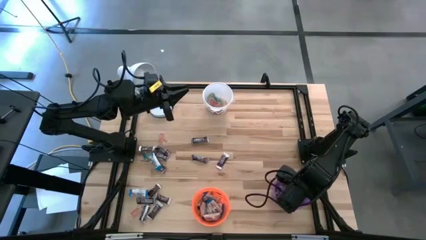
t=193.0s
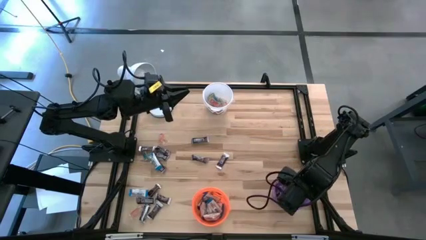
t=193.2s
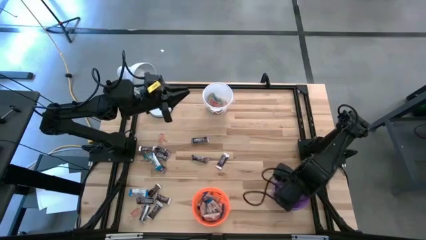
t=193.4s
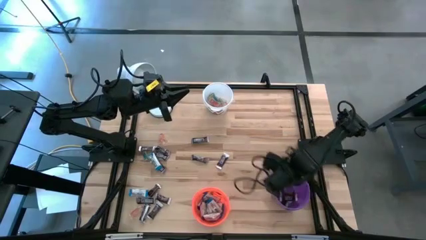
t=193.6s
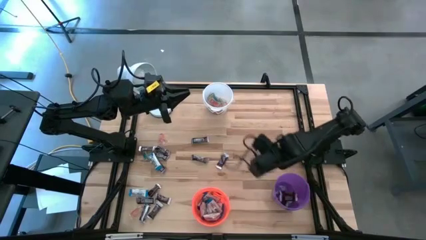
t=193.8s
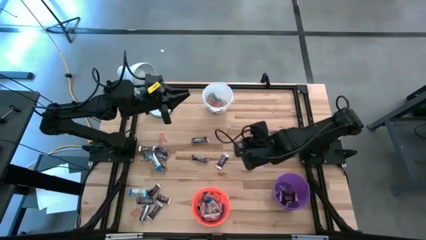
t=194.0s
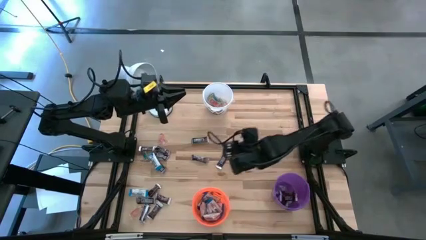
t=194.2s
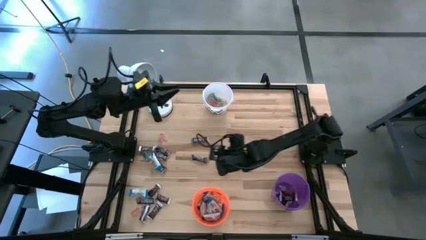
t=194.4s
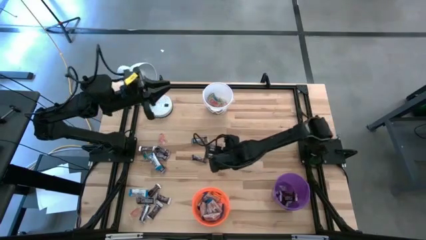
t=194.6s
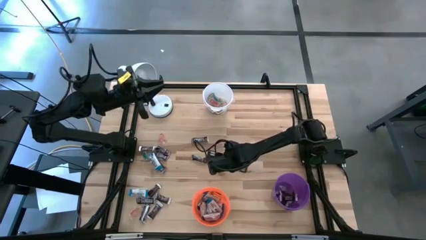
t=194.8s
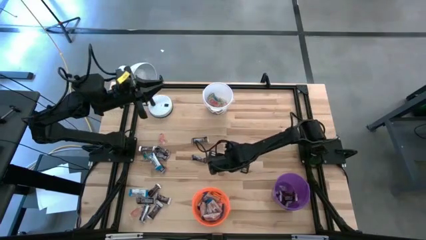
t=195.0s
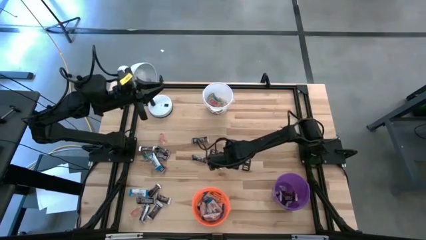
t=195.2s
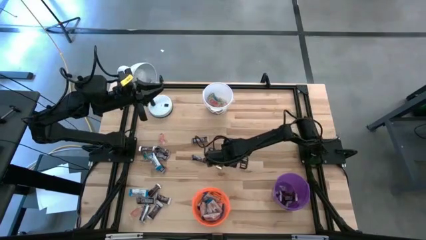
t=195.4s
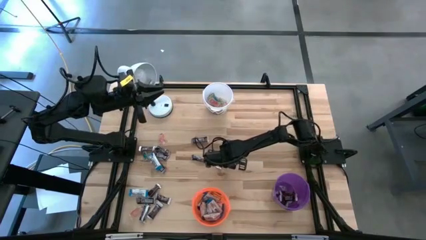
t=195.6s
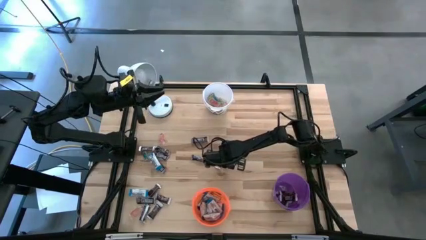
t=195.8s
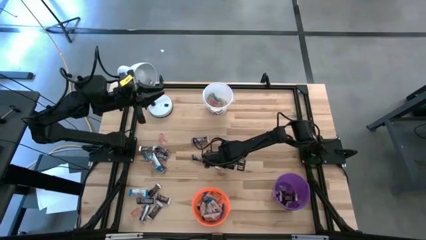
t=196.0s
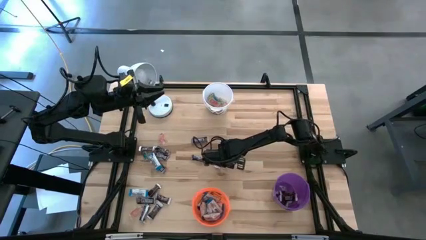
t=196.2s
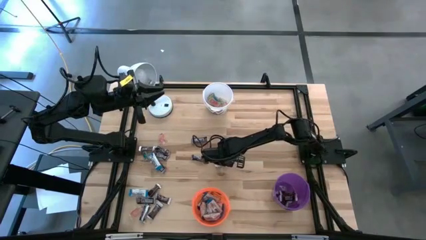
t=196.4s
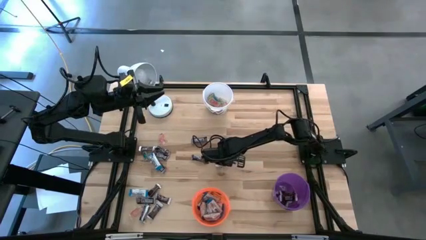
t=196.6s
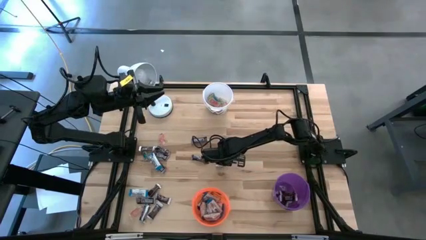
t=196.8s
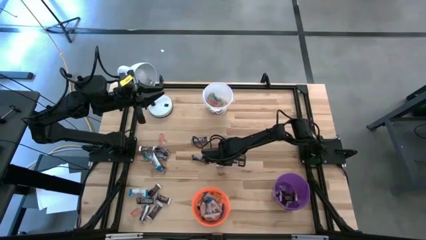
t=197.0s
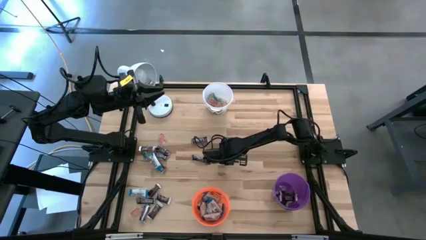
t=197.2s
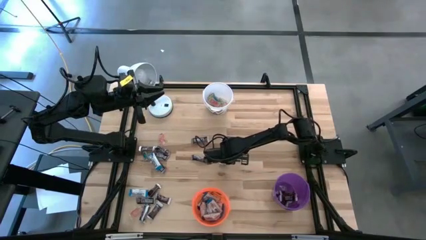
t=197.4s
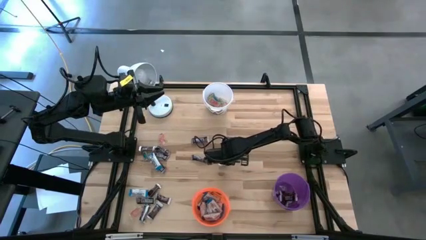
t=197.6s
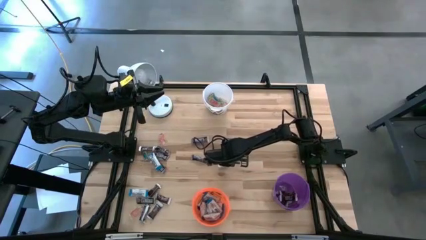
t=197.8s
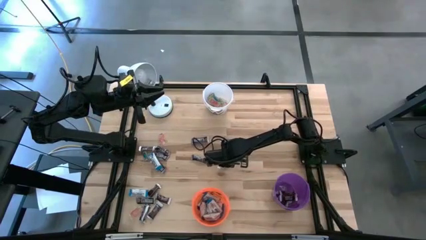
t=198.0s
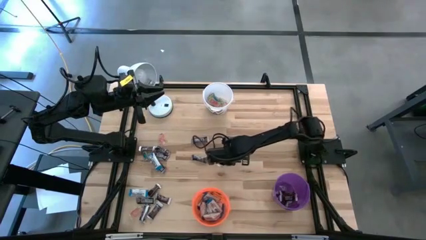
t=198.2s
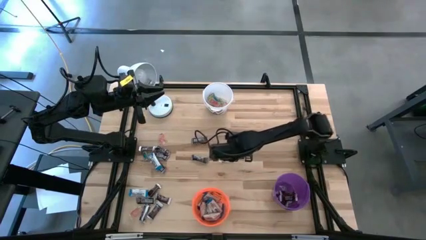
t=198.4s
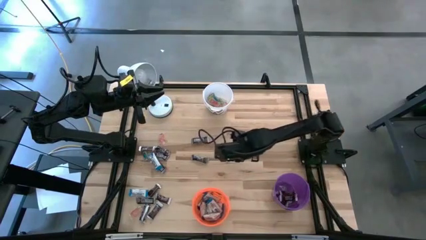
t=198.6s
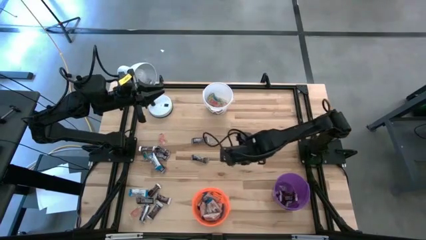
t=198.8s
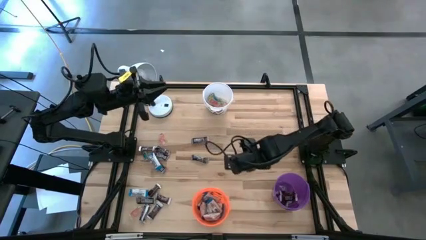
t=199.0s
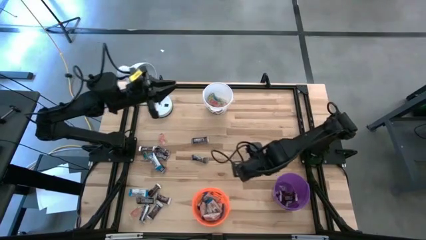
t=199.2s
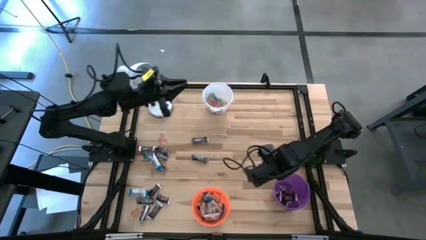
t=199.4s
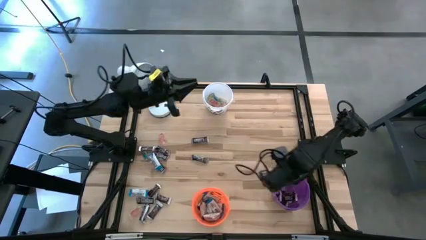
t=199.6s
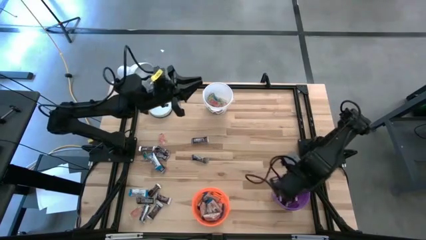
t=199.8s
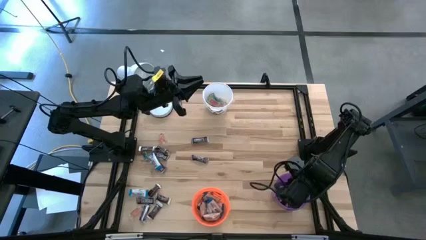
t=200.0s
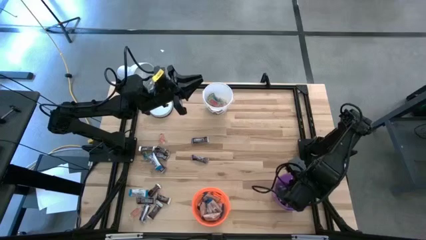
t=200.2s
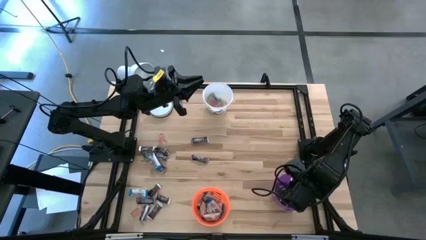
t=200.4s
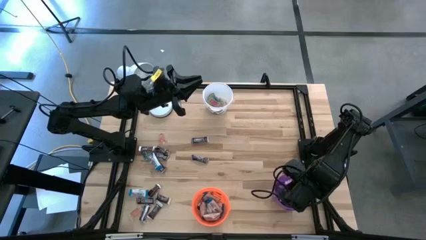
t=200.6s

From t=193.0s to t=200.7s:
Task: Organize candy in baskets
Put the dark brown chocolate bar into the dark purple bucket

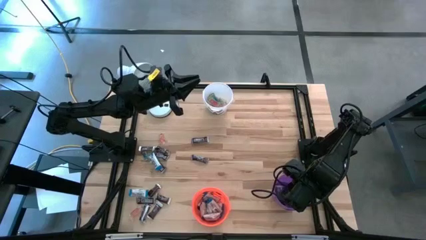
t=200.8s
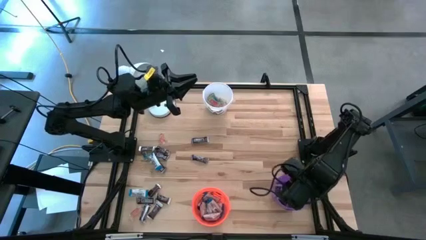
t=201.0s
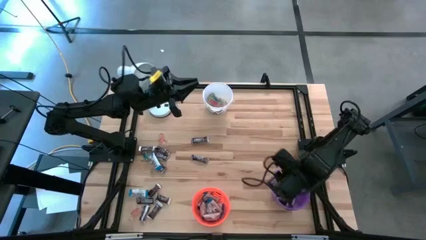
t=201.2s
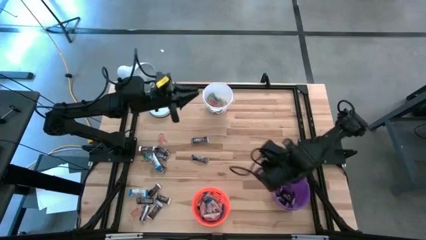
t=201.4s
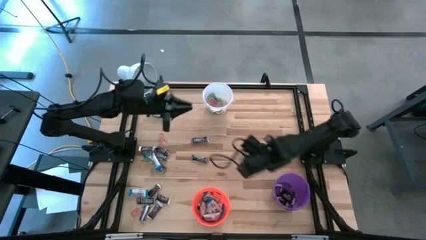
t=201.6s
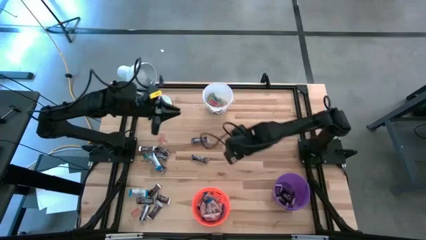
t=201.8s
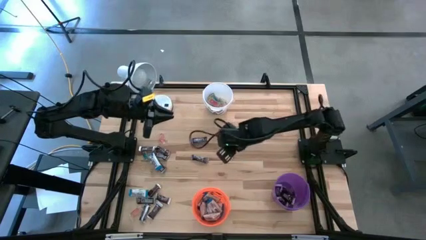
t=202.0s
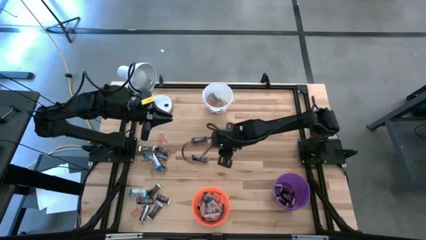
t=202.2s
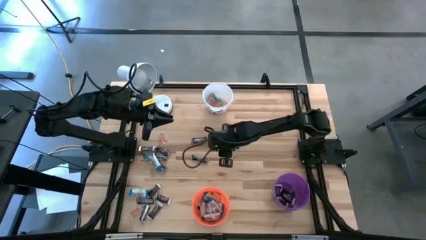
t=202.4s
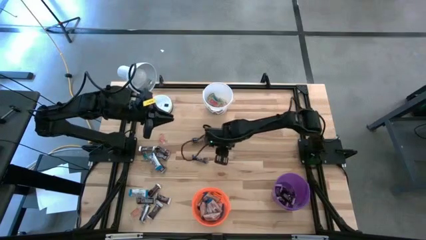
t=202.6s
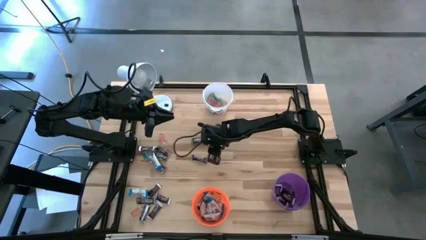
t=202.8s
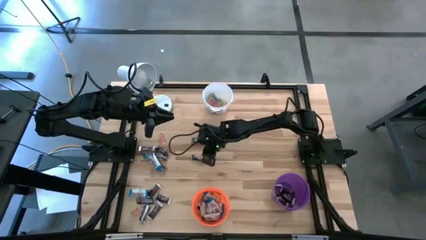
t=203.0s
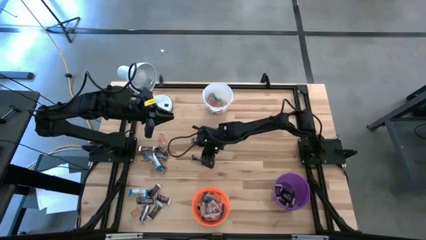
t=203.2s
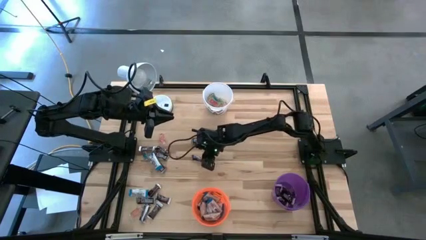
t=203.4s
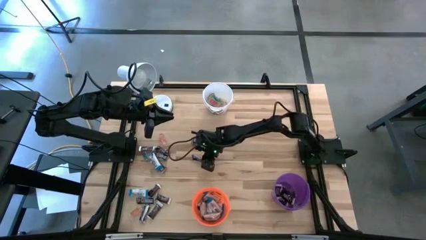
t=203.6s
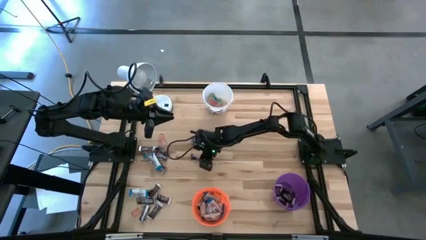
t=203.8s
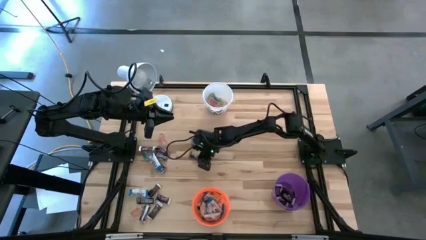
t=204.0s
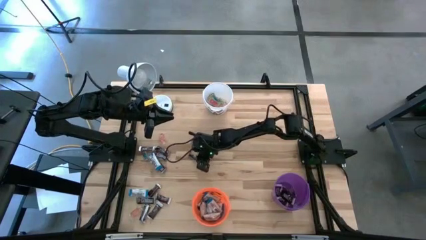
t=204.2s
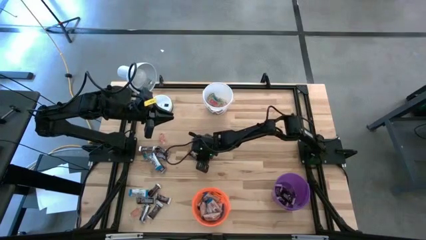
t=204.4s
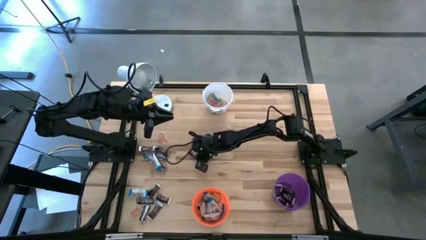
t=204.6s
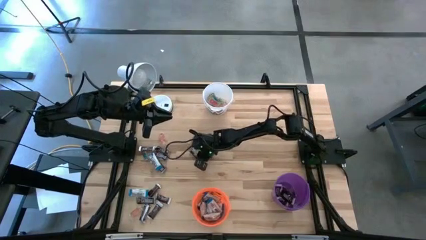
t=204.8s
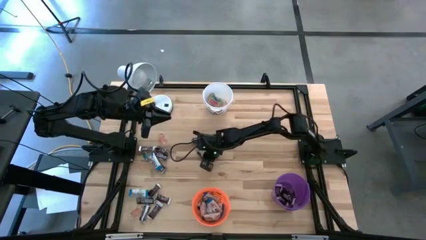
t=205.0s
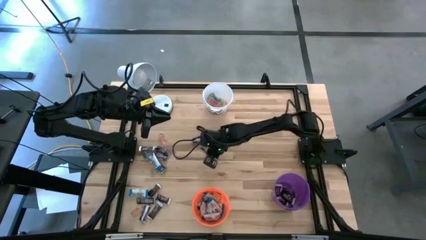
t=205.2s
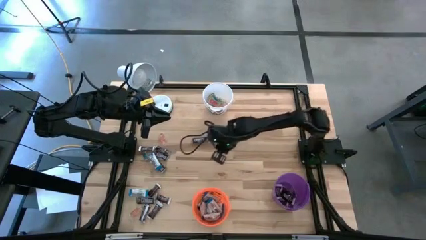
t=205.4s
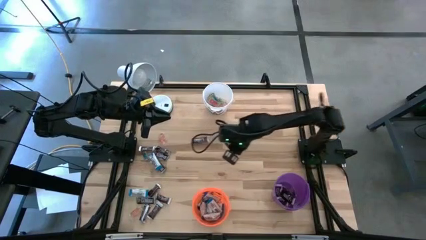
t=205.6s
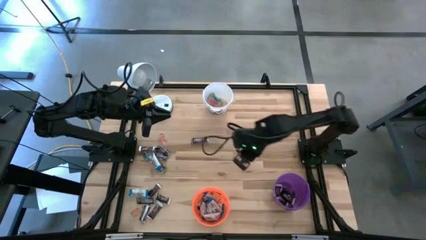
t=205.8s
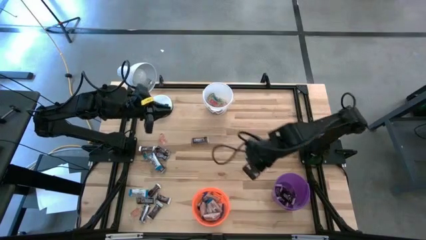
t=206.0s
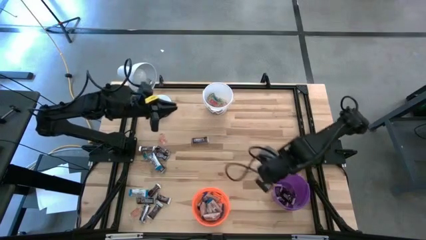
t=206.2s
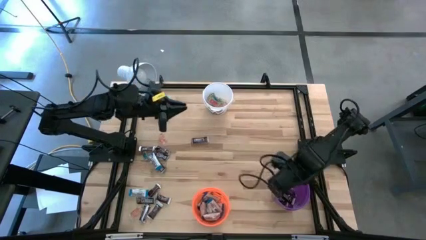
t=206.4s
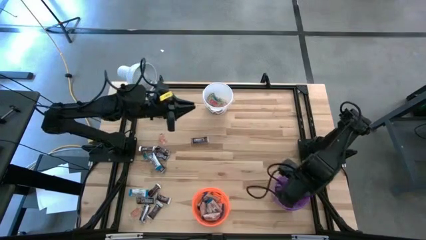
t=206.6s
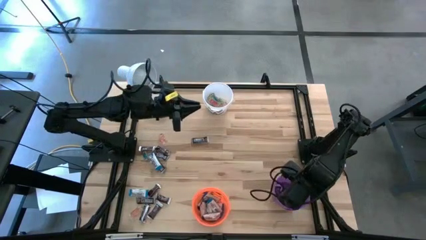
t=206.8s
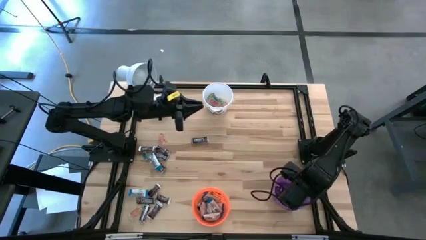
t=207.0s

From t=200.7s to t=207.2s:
Put the dark brown chocolate bar into the dark purple bucket

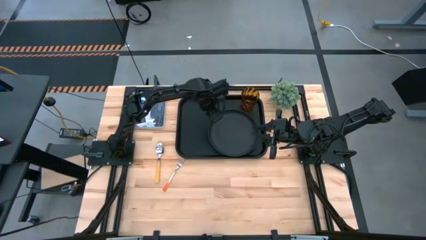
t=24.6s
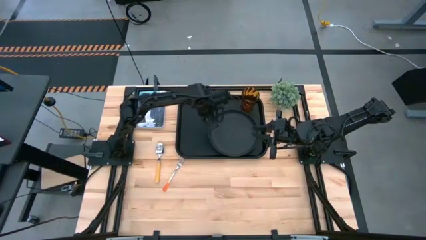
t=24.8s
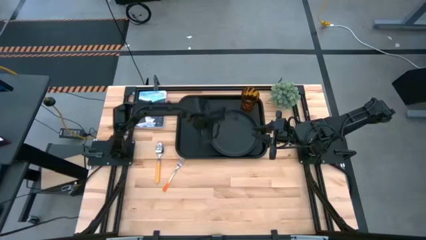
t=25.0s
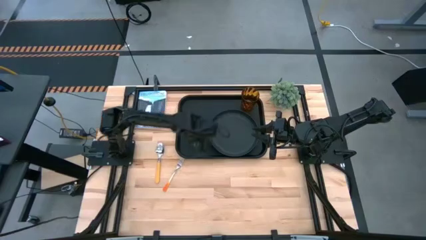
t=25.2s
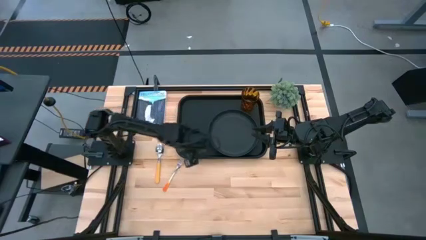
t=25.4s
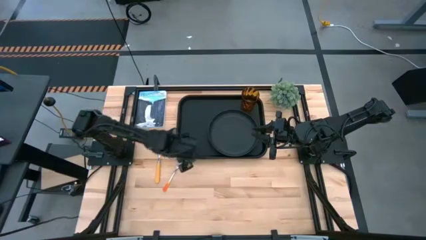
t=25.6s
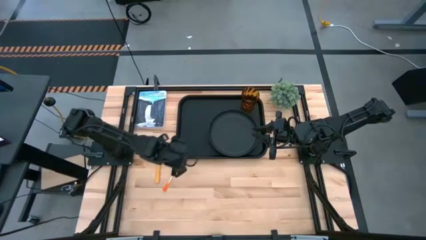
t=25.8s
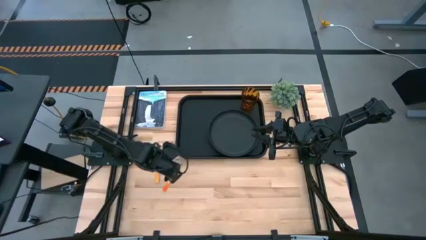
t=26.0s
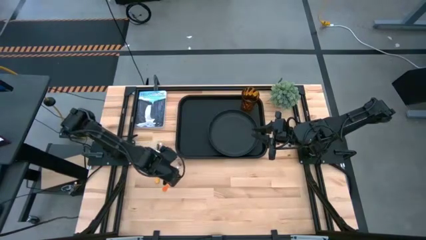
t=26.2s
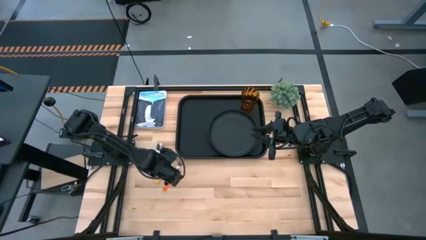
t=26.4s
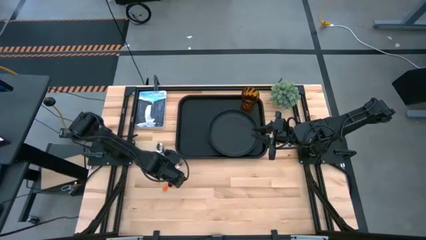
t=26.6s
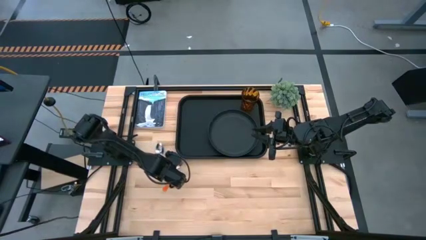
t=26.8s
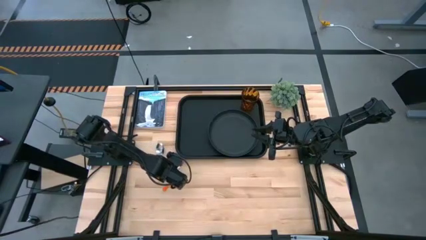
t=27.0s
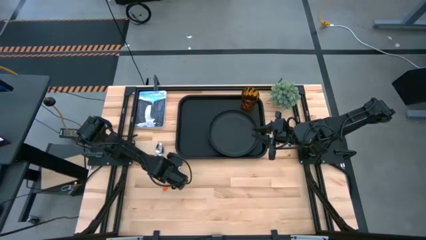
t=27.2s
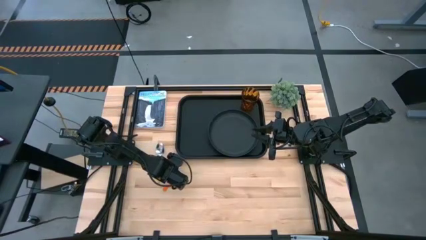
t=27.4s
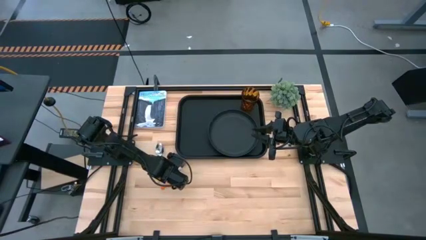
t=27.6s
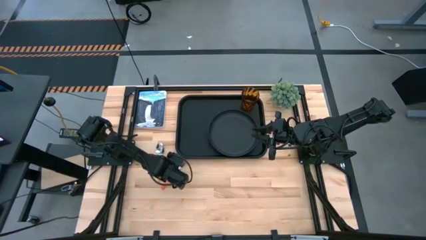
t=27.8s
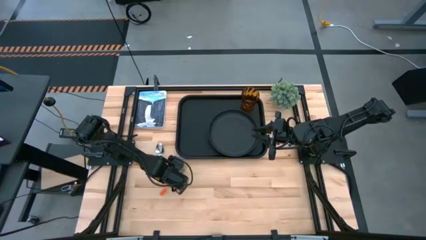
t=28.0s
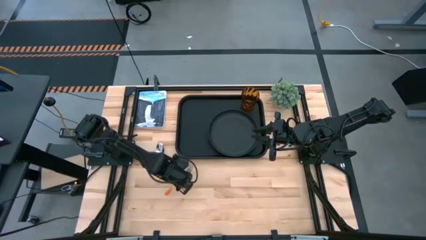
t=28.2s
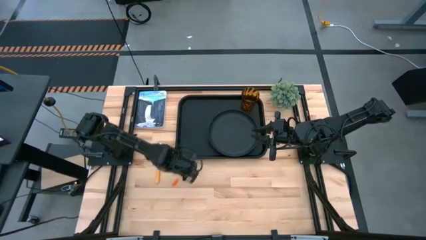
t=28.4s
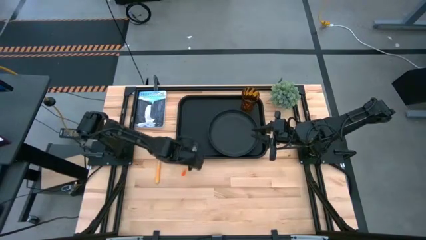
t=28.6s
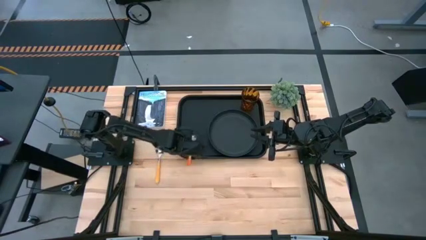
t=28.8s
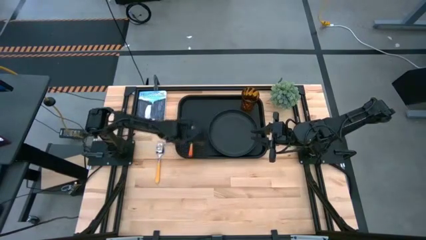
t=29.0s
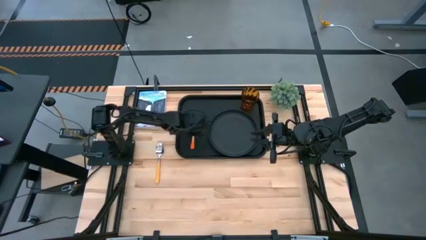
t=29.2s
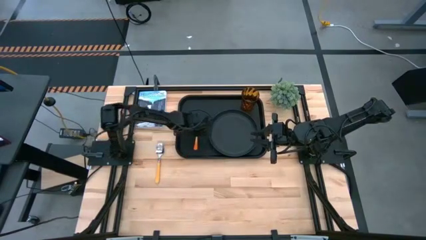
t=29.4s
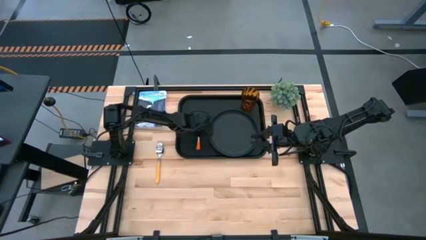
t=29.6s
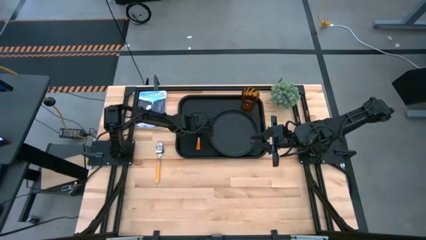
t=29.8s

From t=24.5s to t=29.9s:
Task: Pick and place plate/cup/fork/spoon on tray
Put the orange fork on the black tray to the left of the black plate
